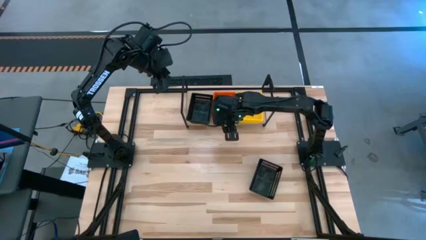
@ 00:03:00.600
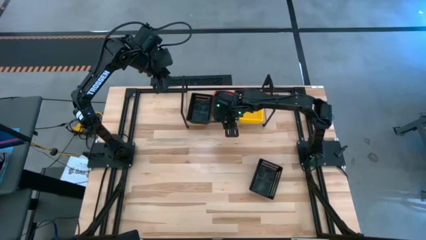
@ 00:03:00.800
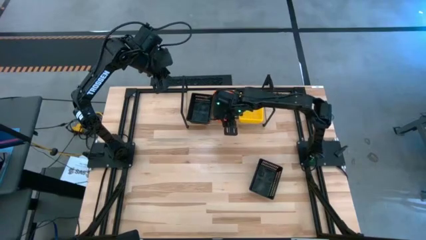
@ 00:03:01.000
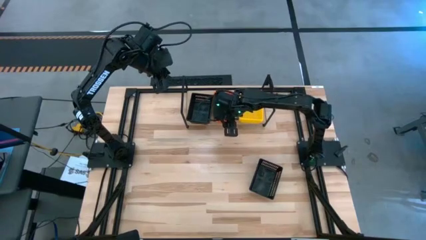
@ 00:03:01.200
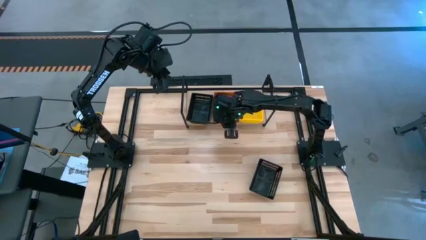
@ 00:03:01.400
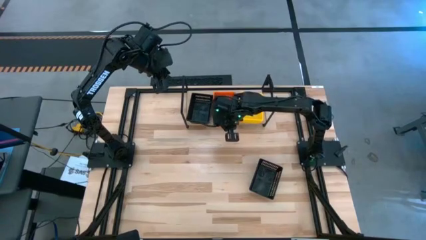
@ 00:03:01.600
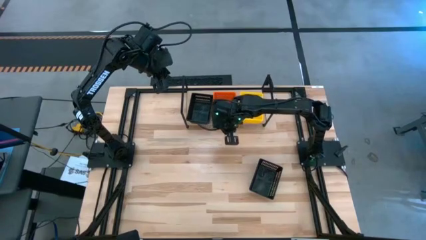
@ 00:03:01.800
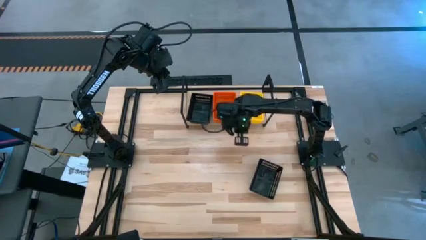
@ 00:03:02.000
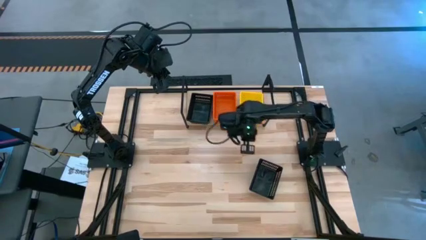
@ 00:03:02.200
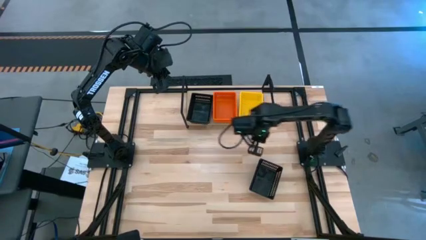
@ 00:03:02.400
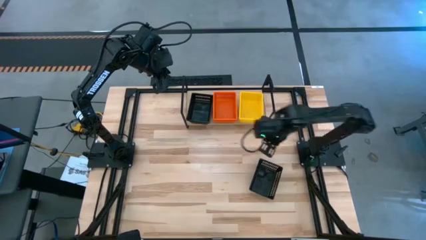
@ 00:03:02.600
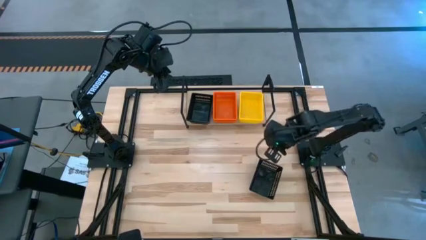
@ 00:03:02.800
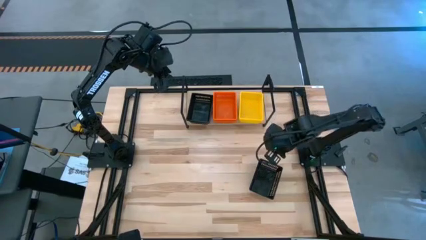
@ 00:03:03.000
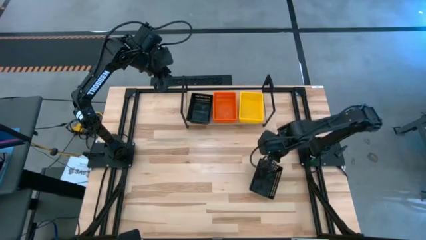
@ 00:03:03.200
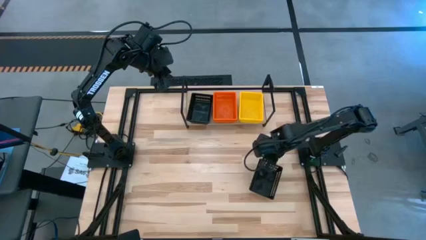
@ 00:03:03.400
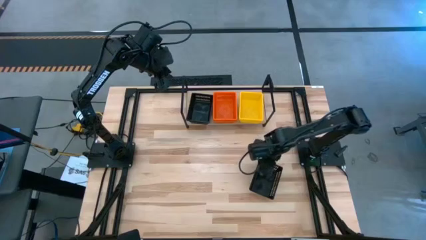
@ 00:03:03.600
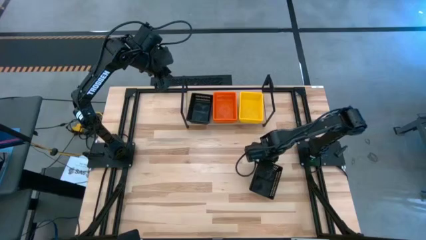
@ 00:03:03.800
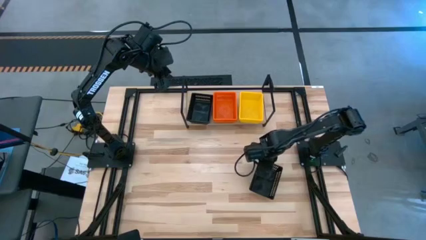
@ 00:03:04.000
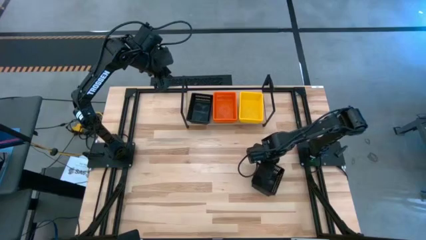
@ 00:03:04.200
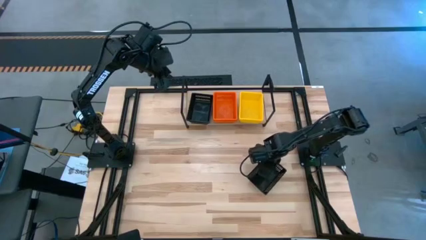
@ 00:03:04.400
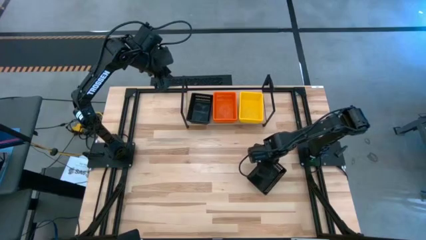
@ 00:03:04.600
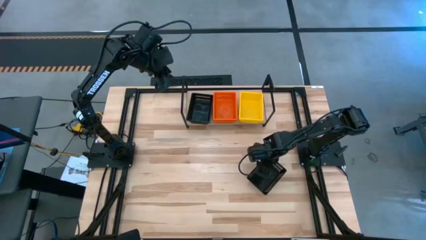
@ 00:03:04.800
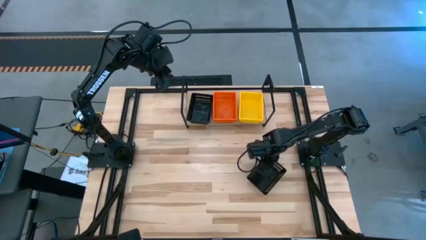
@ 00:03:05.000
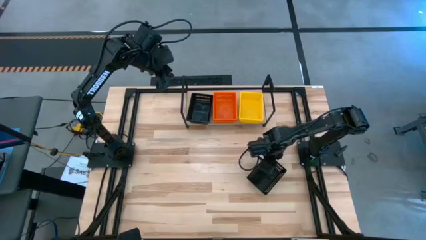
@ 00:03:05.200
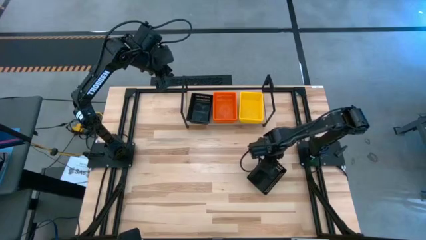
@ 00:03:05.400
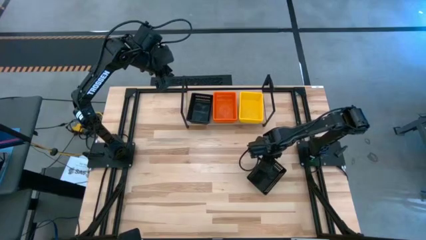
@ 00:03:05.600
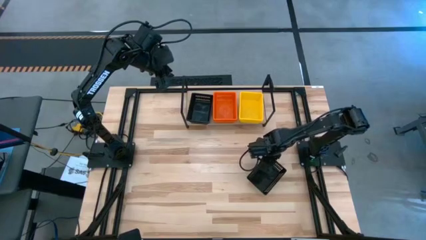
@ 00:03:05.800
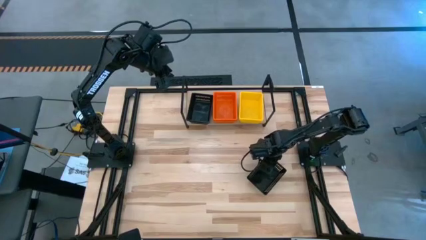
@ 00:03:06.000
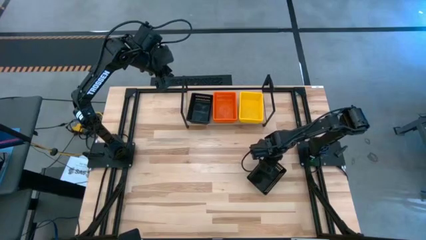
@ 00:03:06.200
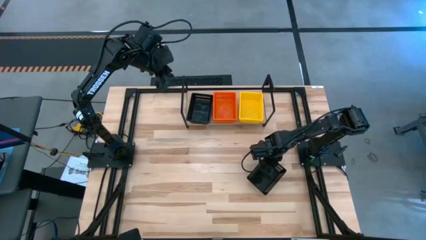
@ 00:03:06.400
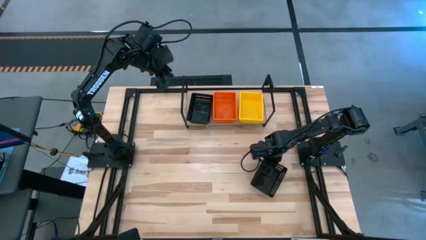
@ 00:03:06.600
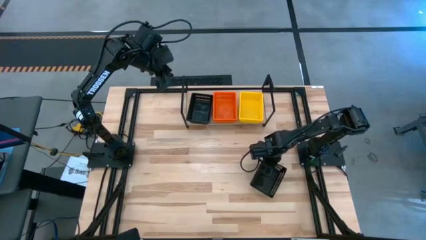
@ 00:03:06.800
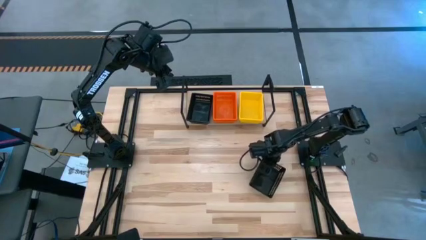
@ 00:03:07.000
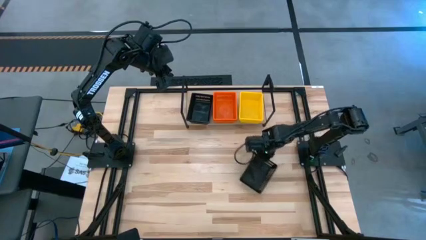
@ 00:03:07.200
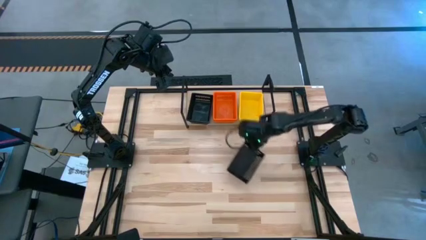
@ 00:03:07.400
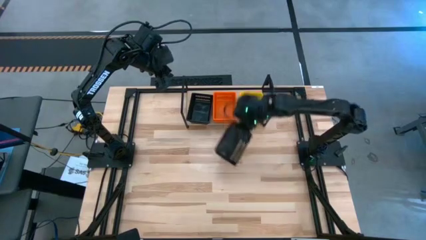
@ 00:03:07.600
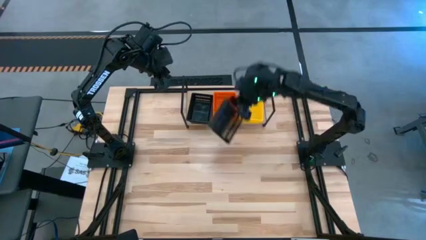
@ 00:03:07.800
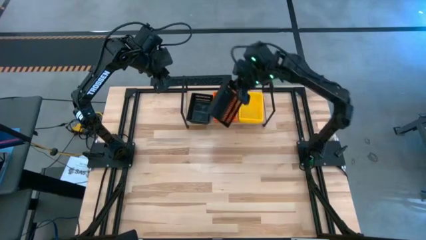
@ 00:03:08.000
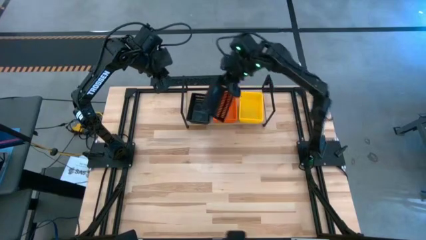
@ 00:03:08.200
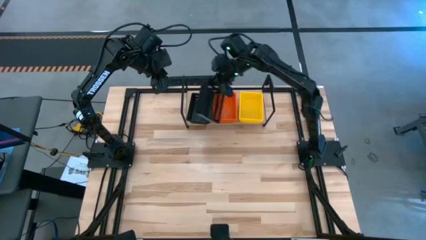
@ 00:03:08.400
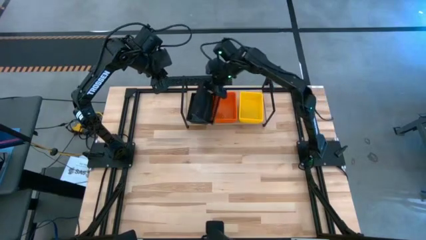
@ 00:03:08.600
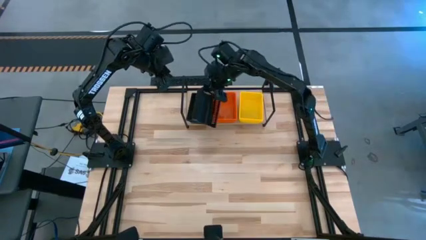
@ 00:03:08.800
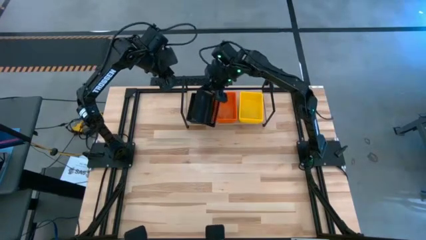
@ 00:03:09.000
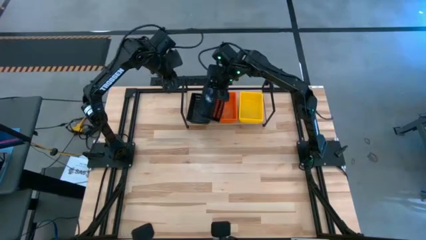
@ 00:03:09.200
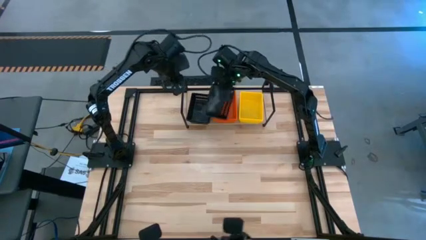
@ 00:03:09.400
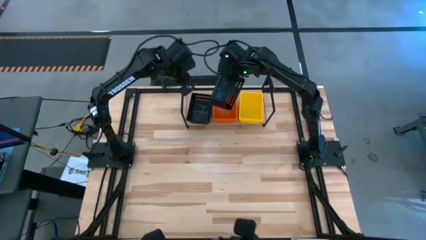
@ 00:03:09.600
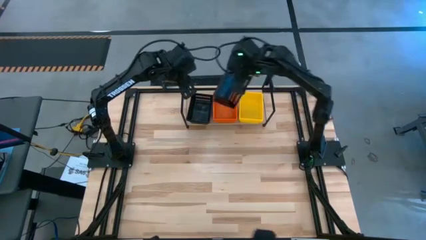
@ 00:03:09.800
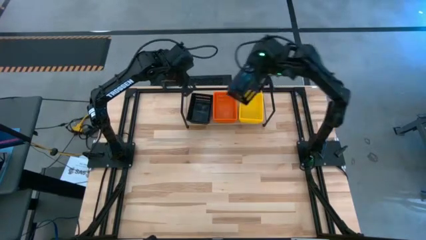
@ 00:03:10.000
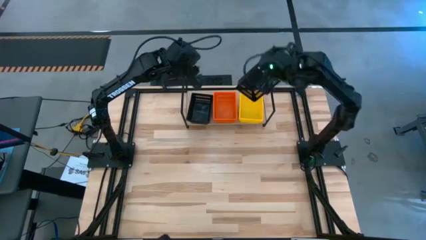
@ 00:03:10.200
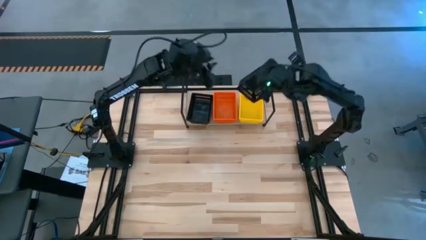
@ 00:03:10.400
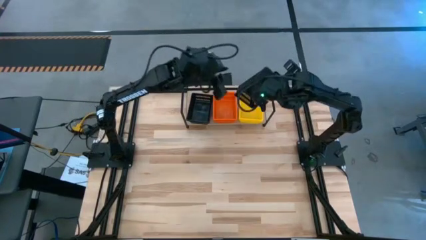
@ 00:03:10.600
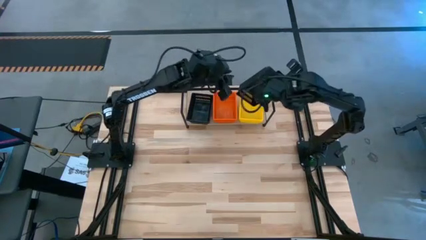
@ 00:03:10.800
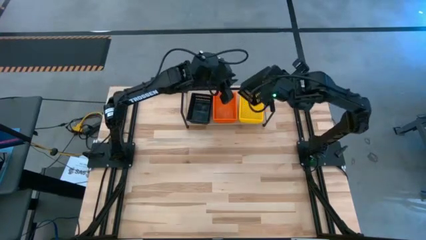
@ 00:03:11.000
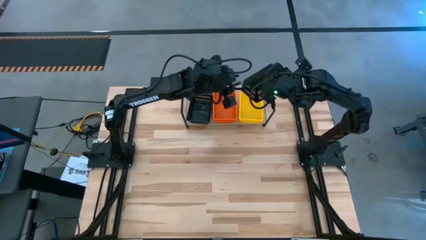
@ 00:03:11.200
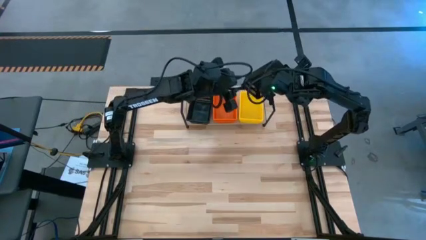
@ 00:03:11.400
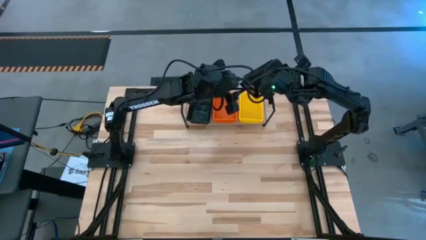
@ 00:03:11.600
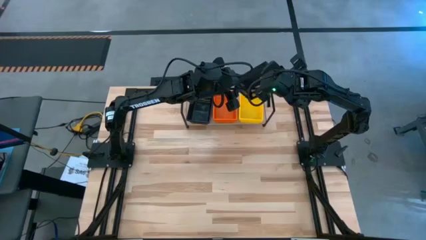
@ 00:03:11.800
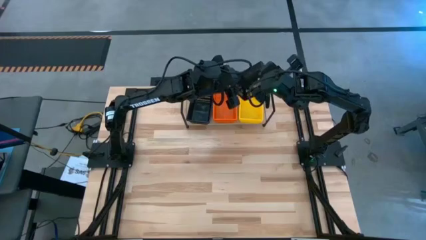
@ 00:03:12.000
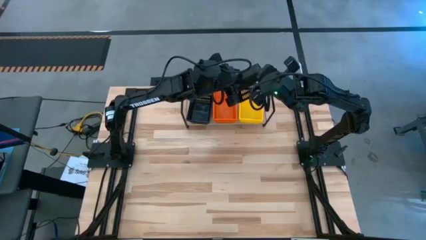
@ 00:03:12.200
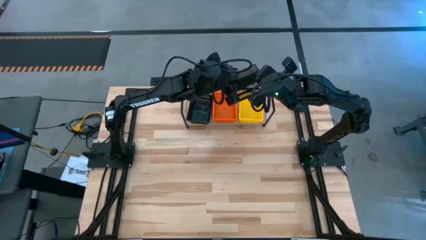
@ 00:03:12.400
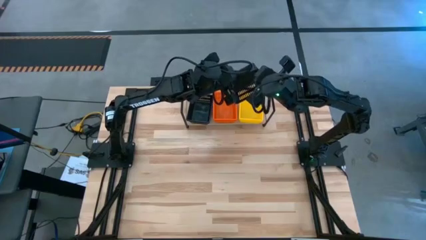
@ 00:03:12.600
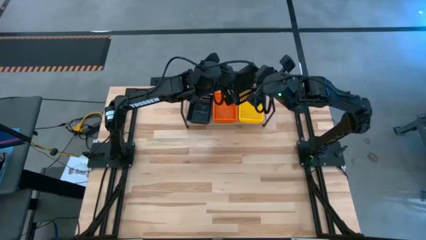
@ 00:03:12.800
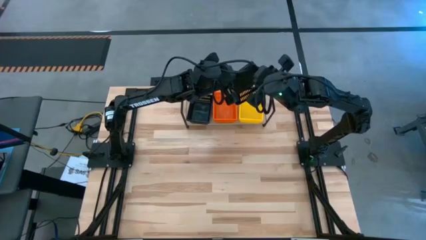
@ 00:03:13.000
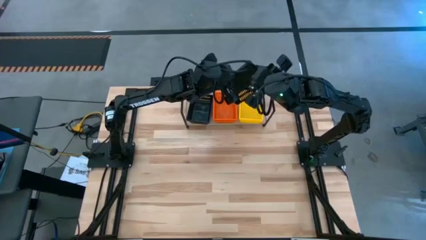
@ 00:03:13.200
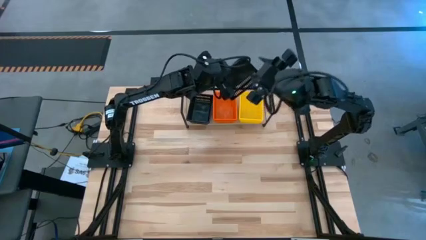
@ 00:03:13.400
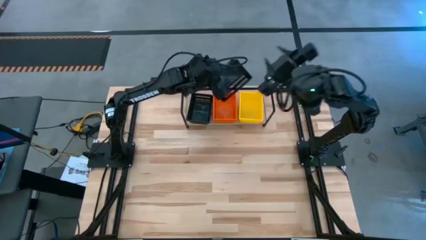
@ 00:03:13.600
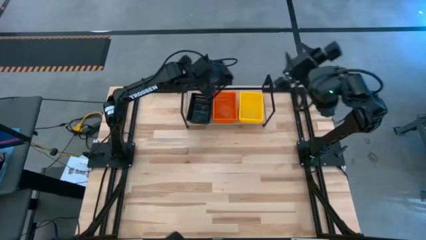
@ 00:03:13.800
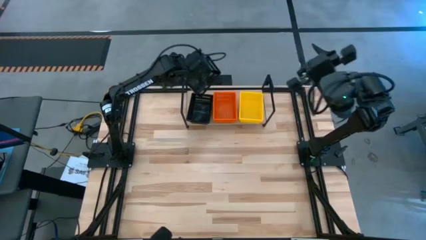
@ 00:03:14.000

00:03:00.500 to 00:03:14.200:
Task: Stack baskets on shelf by color
Stack the black bin on top of the other black bin on the shelf
